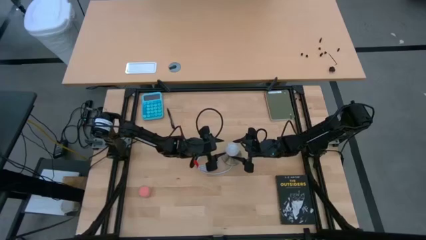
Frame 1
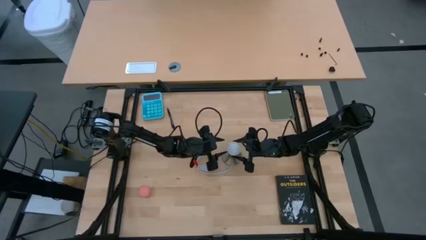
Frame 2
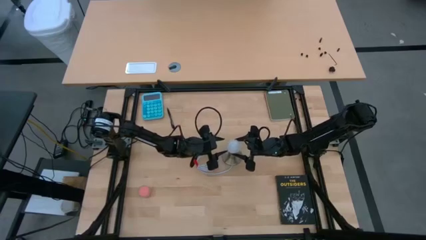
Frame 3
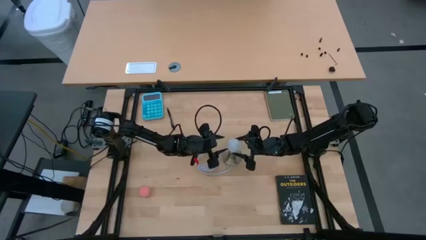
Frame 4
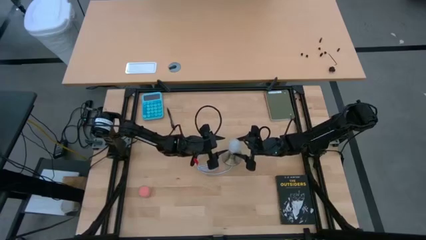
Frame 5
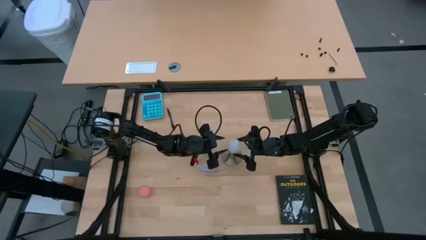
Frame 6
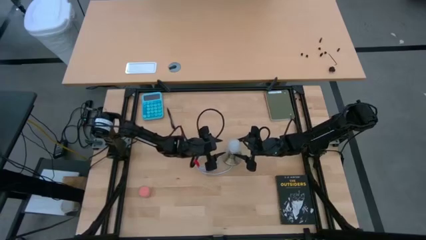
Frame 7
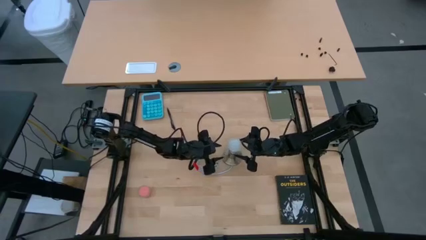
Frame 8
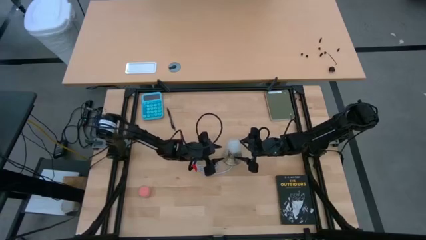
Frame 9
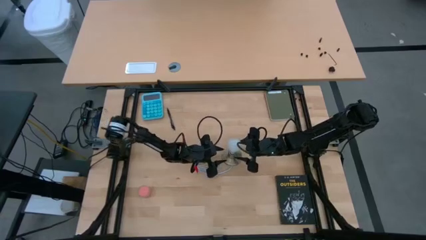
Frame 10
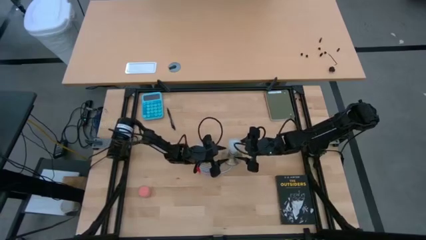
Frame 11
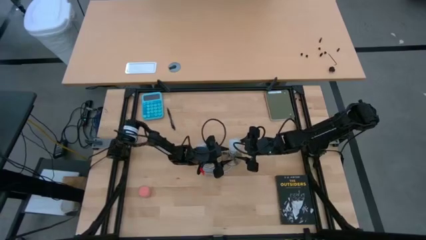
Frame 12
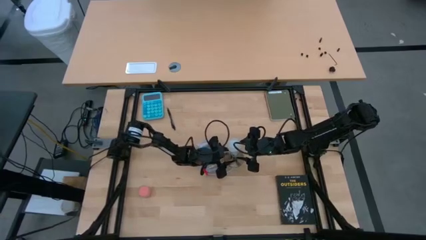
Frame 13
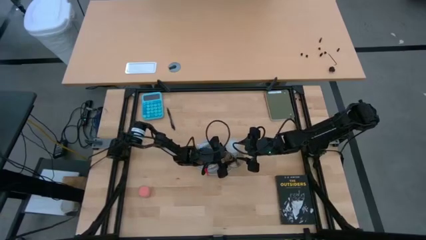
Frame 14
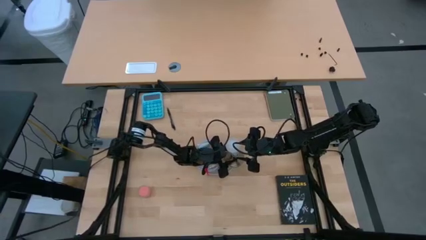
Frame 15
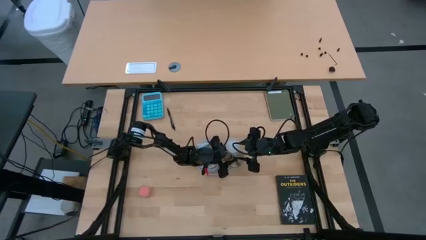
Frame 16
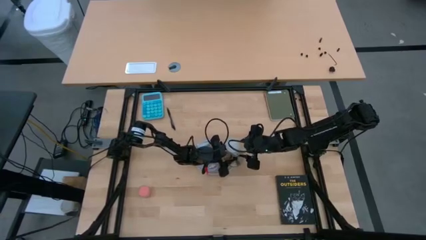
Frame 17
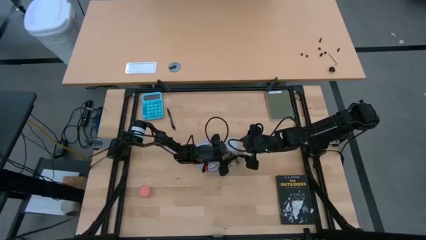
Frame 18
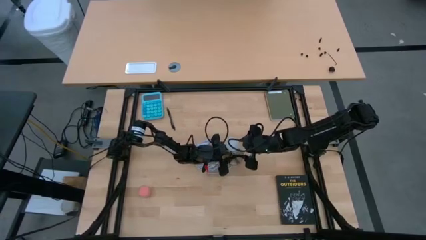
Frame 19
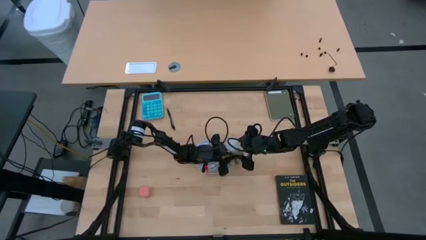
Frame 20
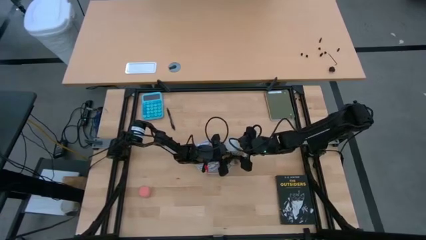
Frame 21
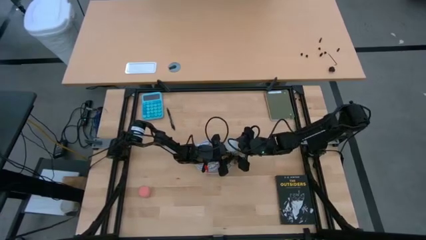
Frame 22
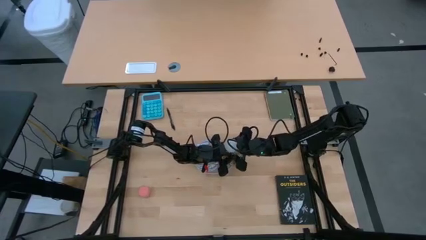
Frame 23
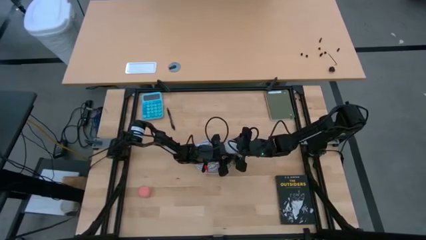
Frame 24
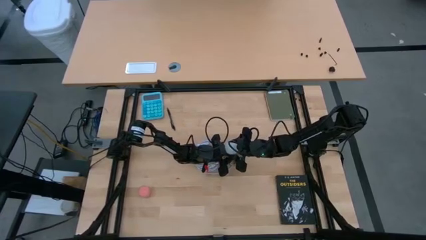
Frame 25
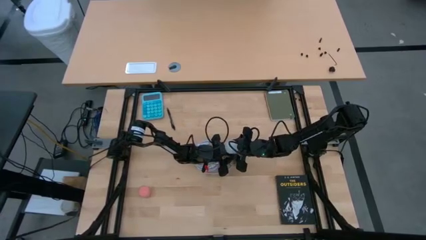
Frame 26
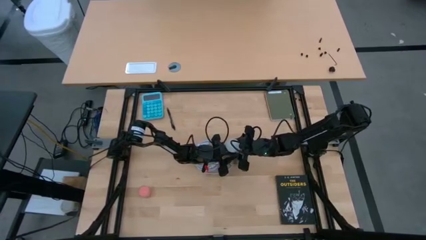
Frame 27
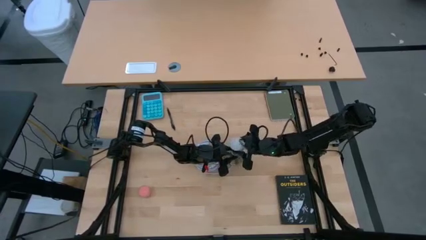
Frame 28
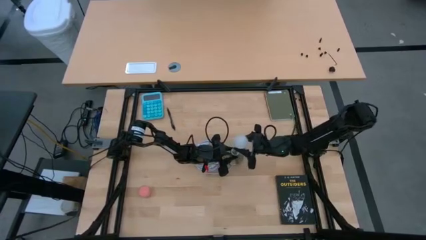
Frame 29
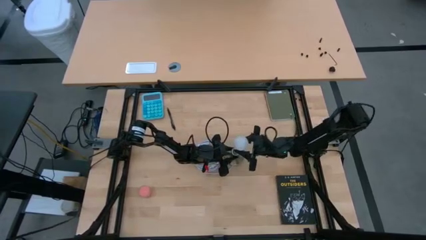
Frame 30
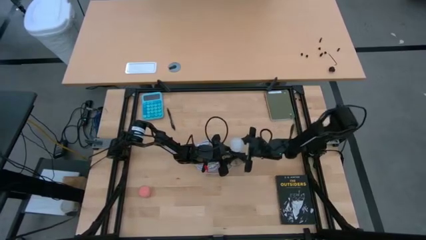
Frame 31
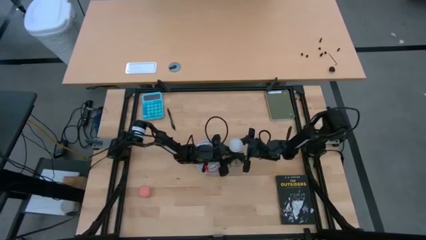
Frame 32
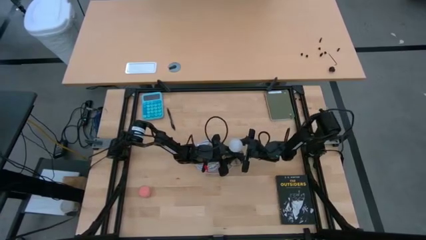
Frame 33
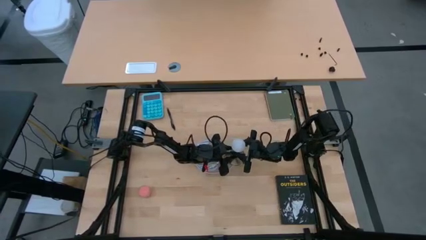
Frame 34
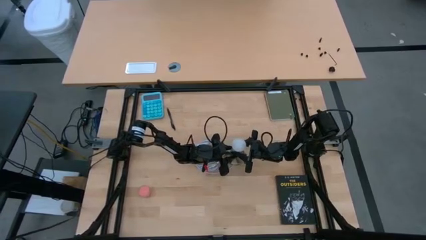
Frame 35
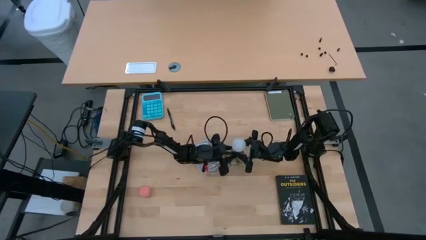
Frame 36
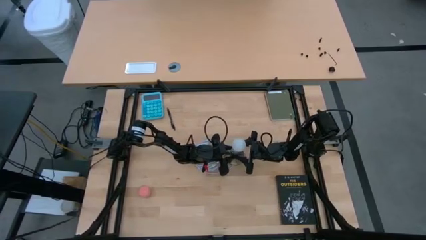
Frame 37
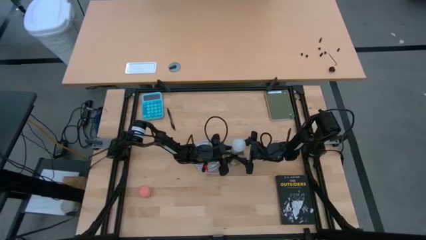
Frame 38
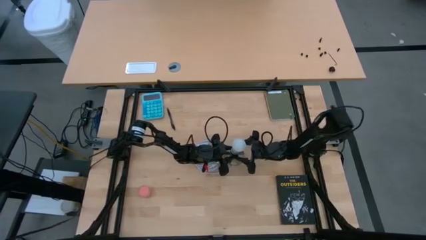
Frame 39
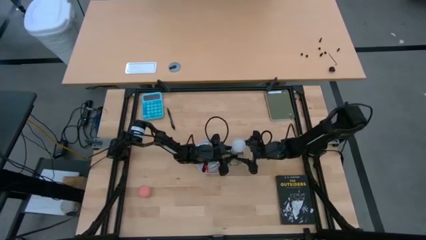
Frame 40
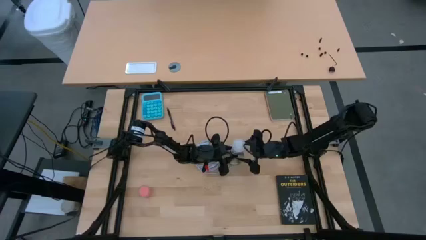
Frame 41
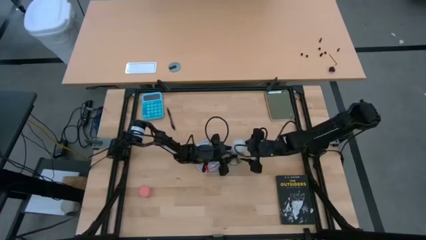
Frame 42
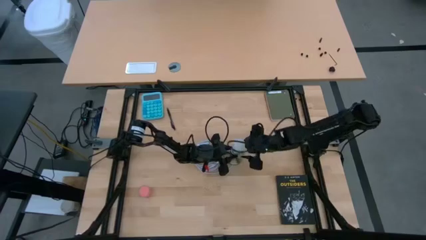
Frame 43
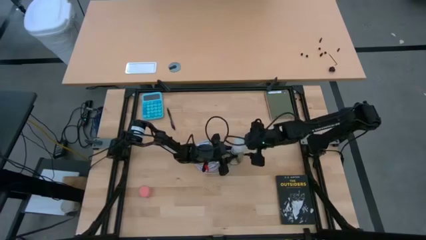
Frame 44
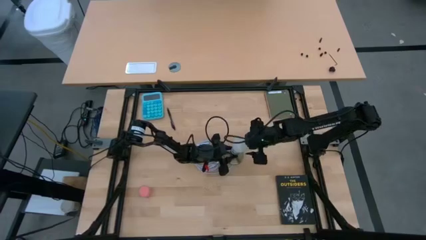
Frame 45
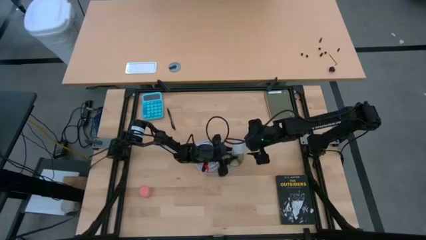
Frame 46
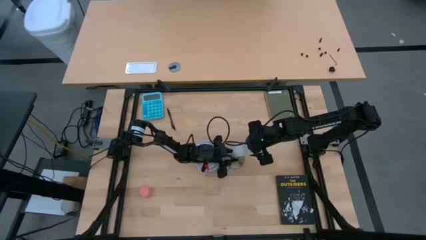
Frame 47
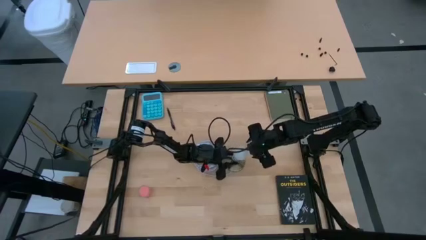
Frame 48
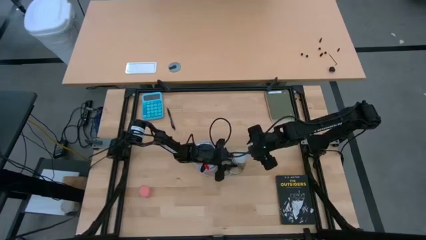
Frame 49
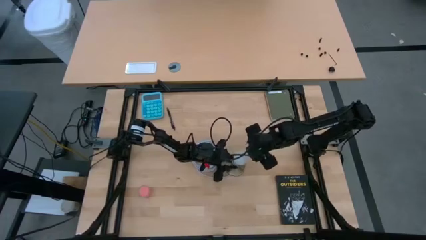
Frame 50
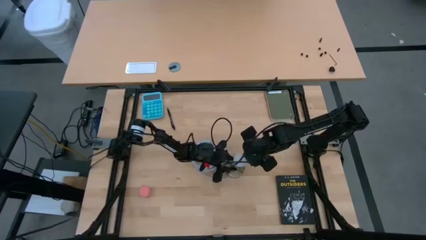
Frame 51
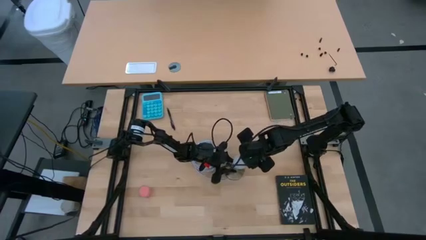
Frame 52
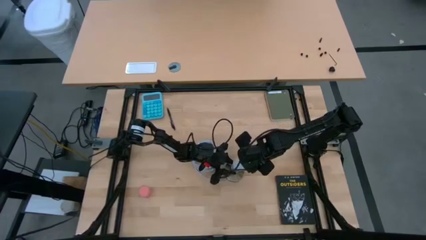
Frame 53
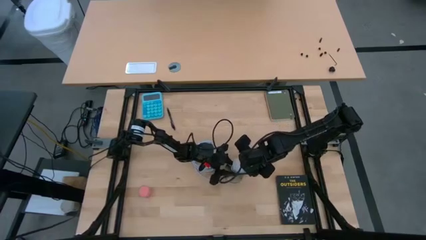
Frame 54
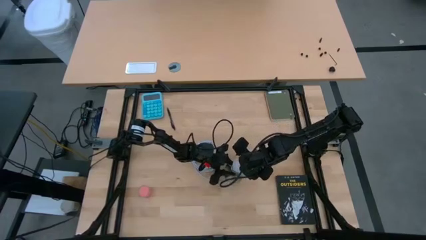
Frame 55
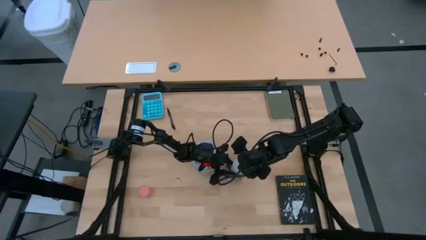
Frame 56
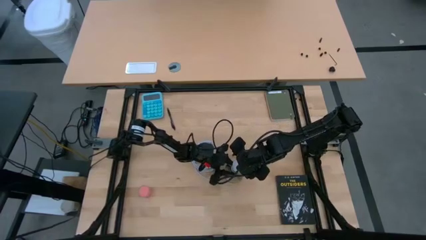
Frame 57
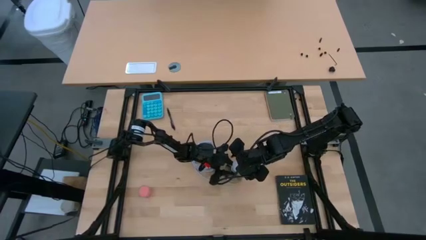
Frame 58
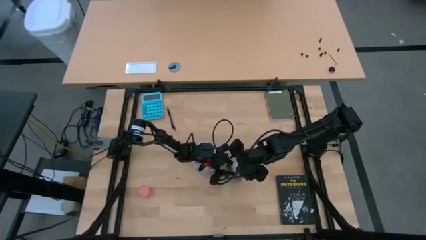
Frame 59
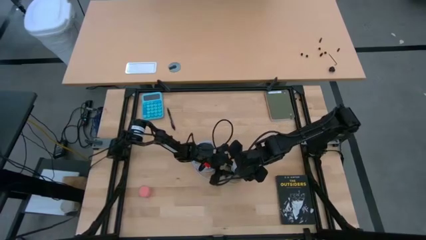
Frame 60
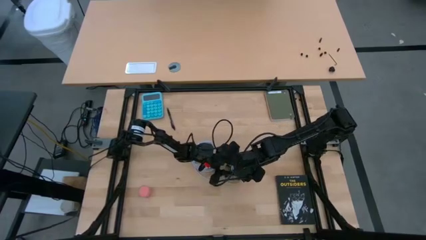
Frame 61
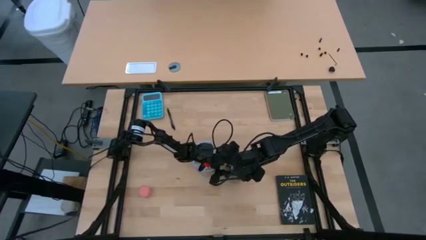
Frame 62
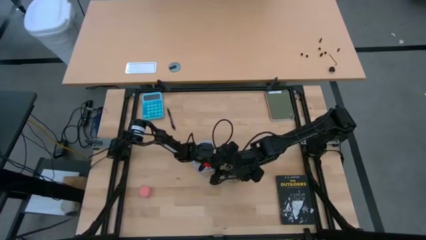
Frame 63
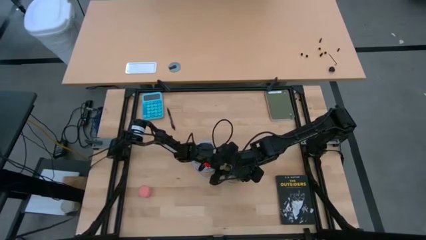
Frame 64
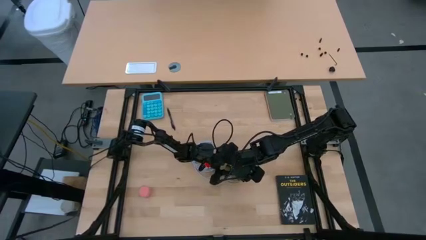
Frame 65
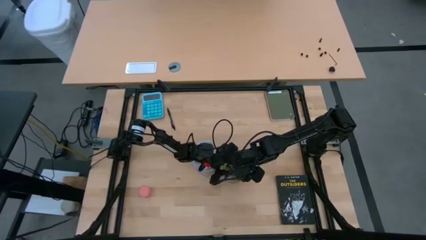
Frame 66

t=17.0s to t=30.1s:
Task: Screw lightbulb
Insert the white lightbulb into the desk lamp
